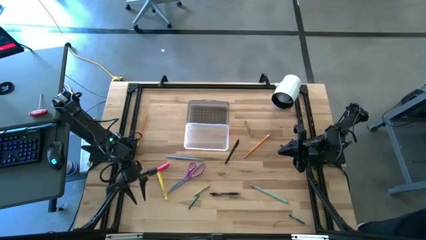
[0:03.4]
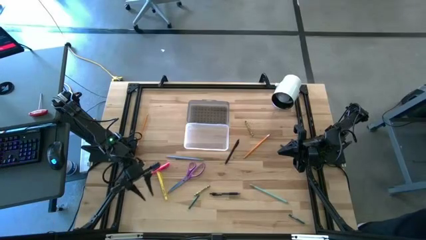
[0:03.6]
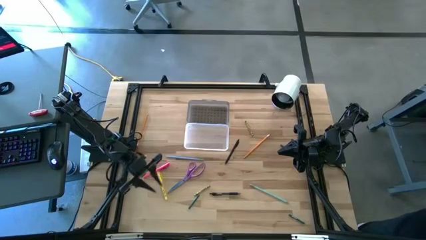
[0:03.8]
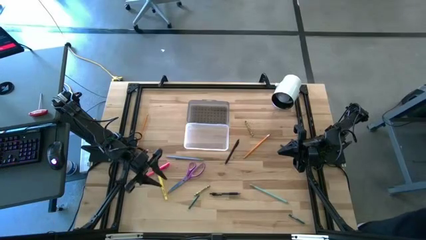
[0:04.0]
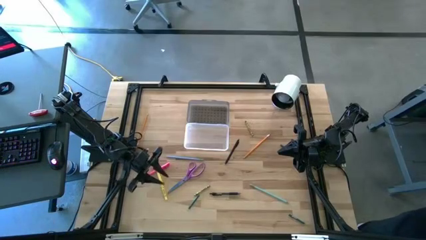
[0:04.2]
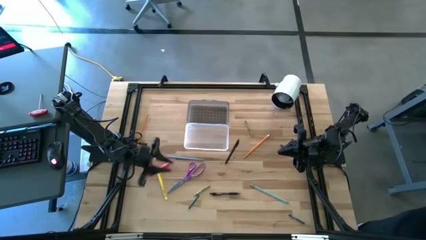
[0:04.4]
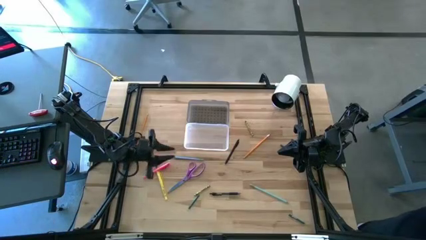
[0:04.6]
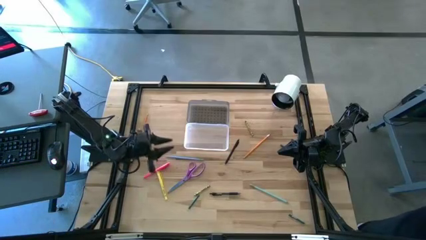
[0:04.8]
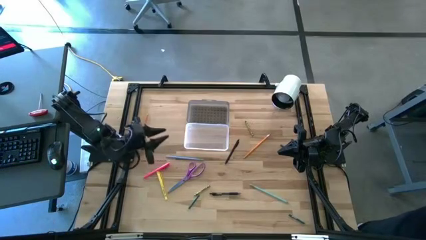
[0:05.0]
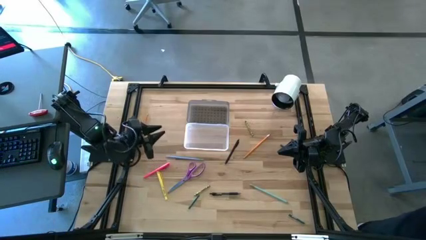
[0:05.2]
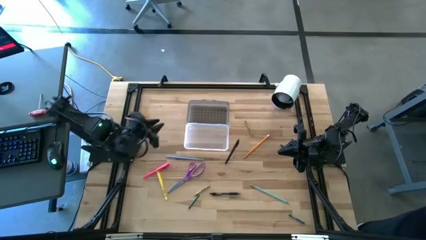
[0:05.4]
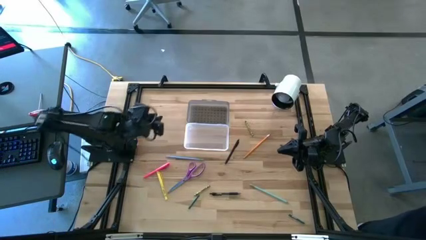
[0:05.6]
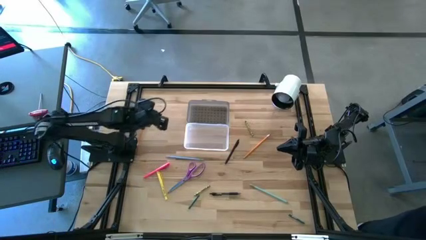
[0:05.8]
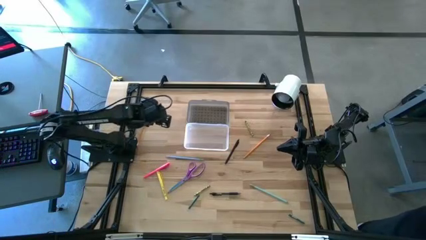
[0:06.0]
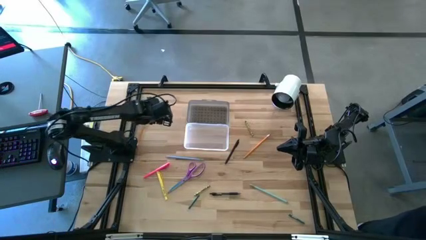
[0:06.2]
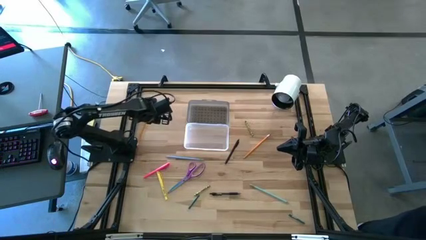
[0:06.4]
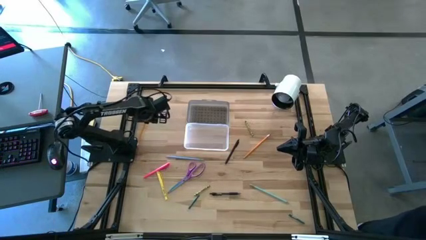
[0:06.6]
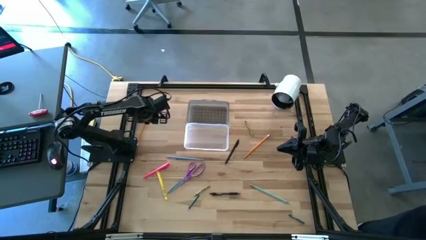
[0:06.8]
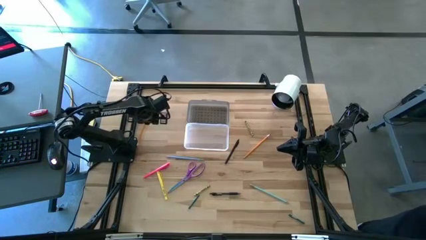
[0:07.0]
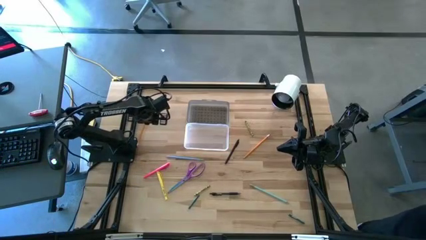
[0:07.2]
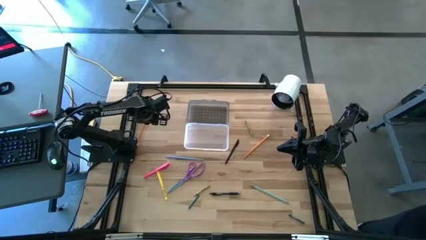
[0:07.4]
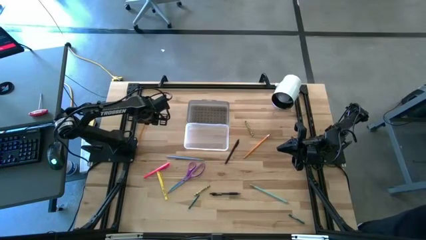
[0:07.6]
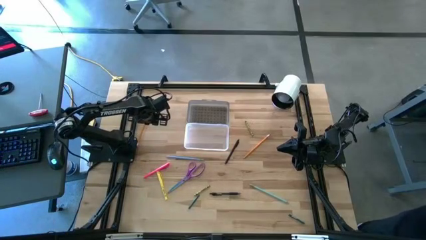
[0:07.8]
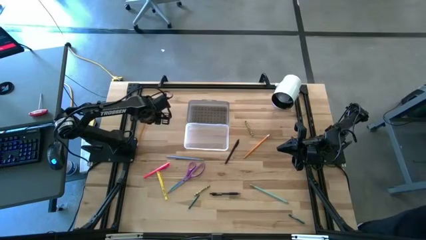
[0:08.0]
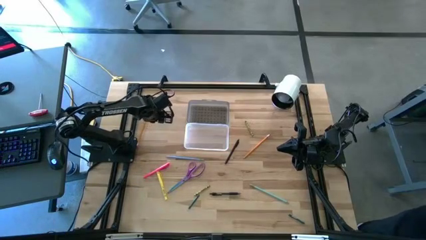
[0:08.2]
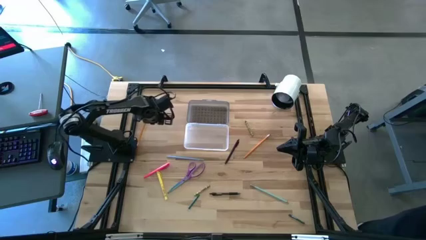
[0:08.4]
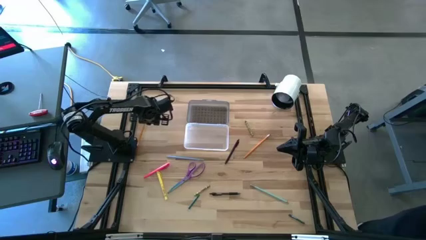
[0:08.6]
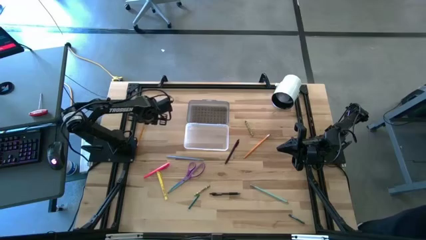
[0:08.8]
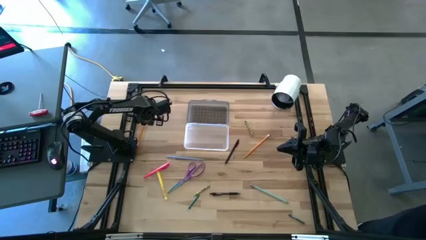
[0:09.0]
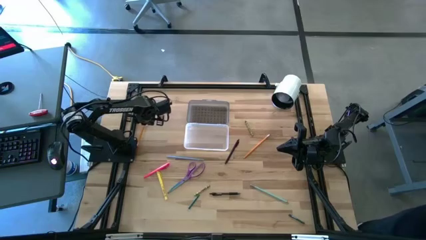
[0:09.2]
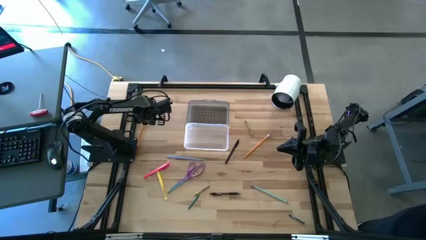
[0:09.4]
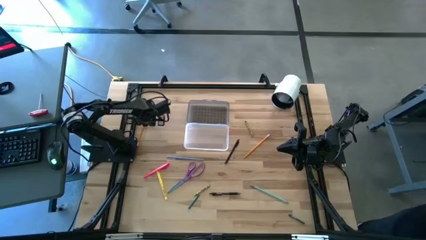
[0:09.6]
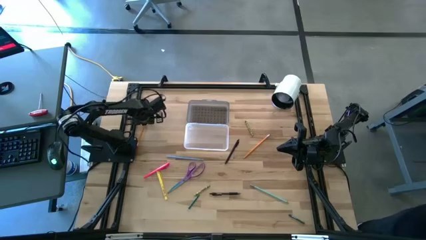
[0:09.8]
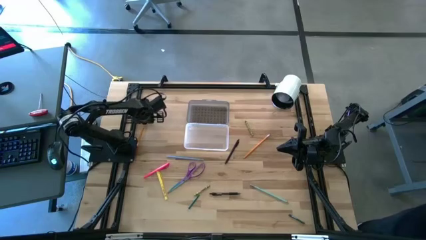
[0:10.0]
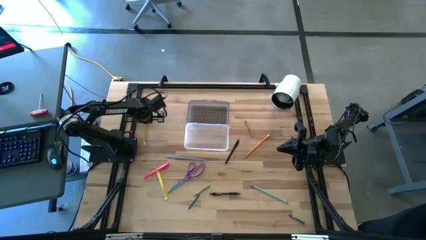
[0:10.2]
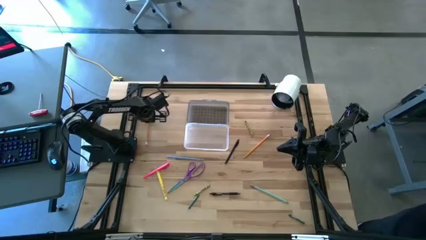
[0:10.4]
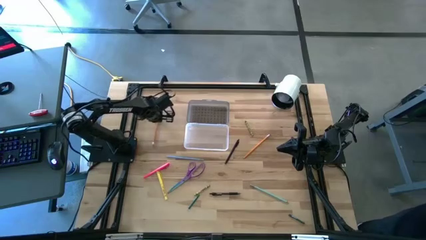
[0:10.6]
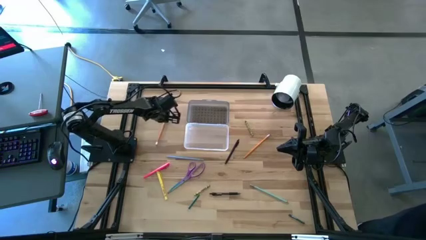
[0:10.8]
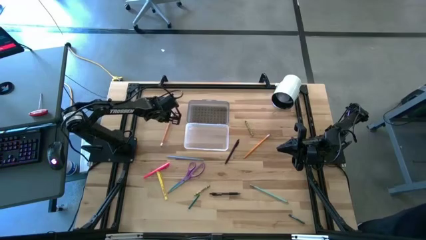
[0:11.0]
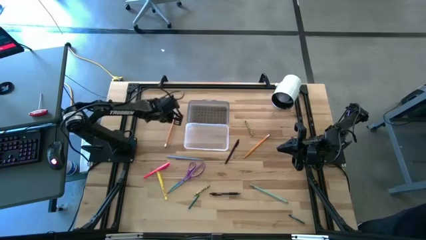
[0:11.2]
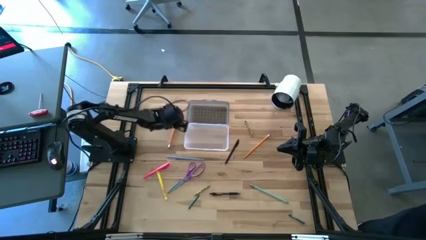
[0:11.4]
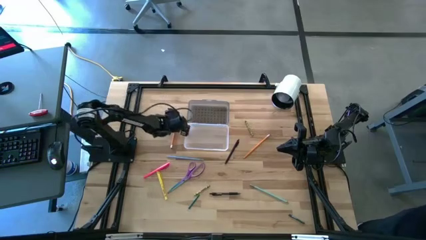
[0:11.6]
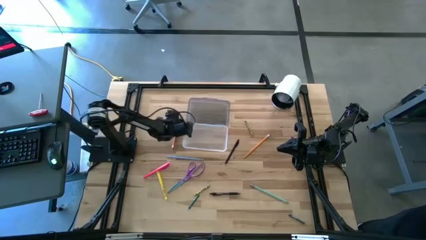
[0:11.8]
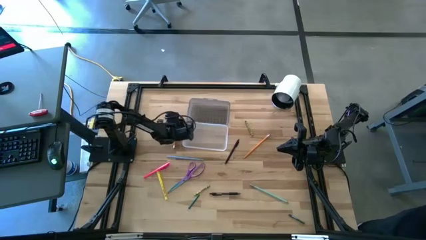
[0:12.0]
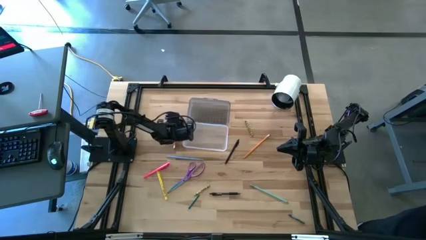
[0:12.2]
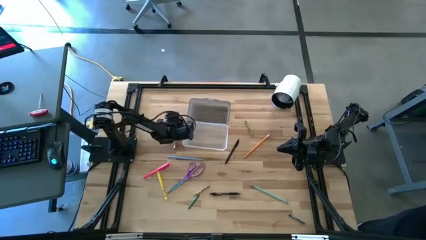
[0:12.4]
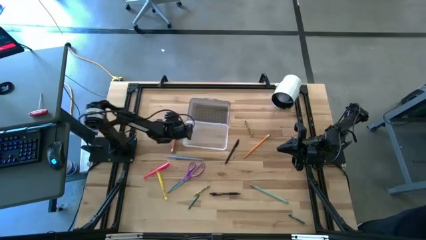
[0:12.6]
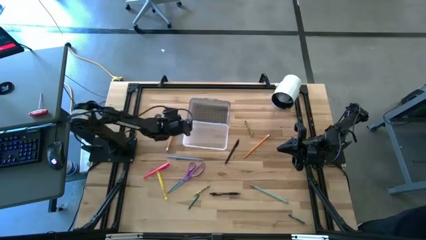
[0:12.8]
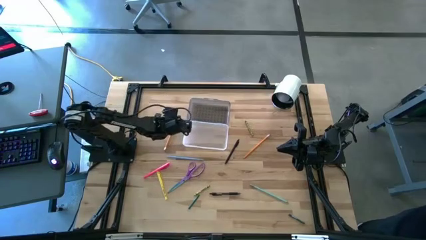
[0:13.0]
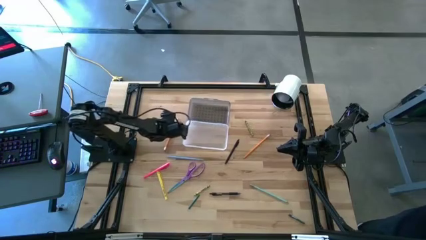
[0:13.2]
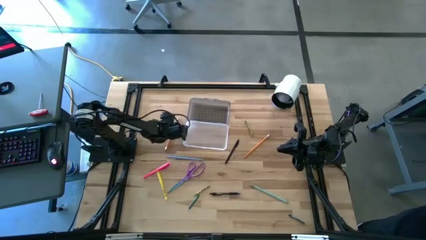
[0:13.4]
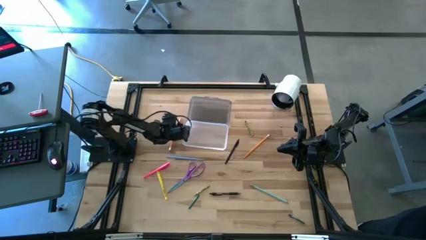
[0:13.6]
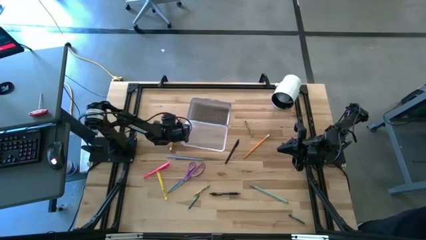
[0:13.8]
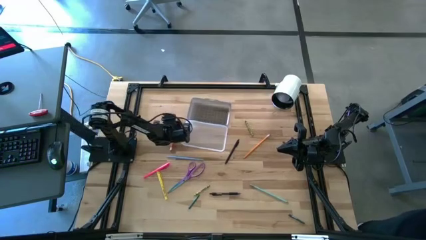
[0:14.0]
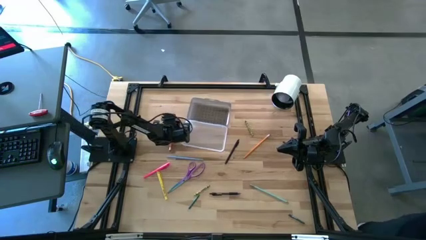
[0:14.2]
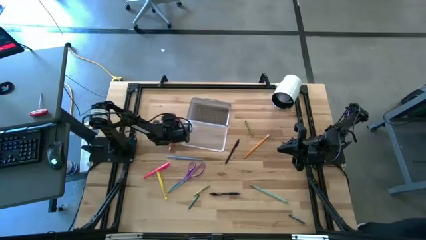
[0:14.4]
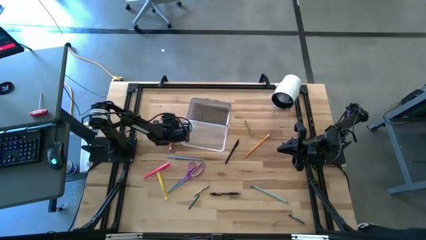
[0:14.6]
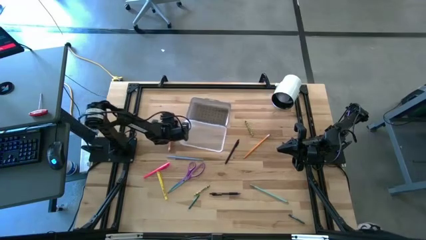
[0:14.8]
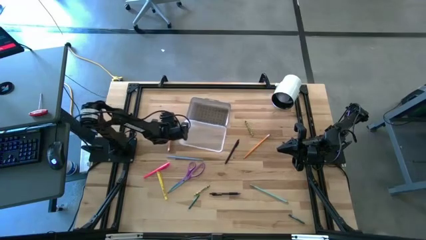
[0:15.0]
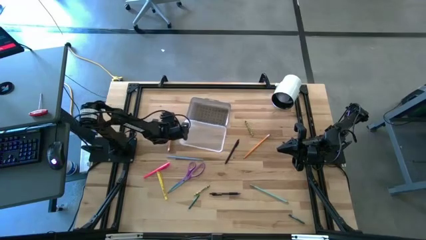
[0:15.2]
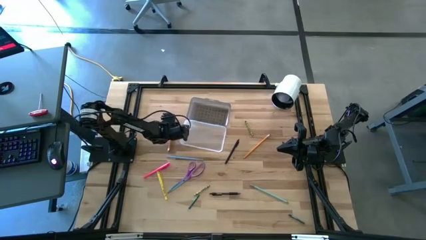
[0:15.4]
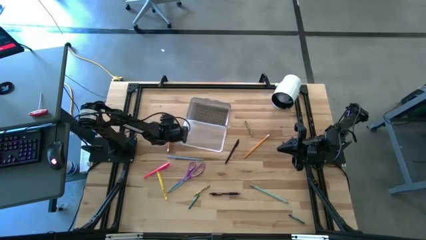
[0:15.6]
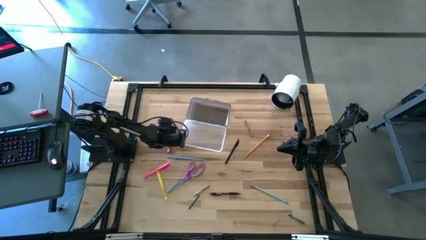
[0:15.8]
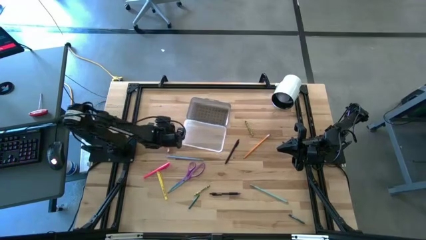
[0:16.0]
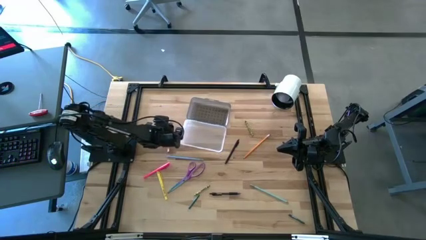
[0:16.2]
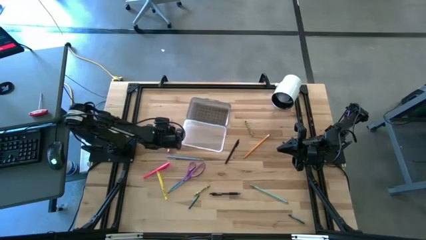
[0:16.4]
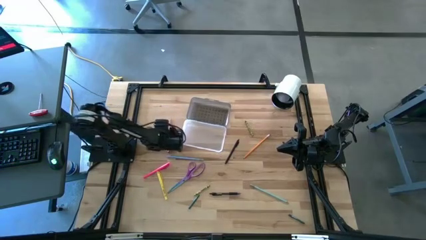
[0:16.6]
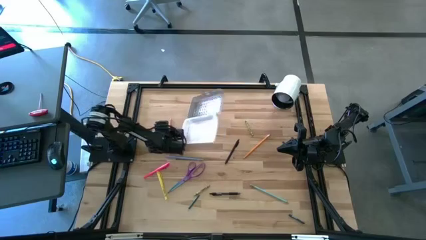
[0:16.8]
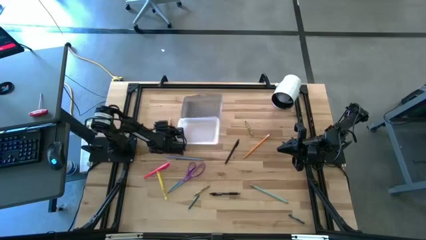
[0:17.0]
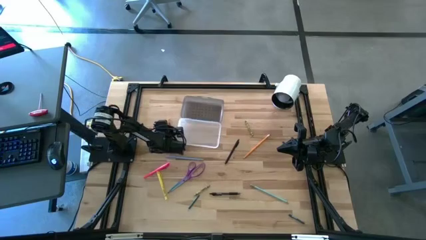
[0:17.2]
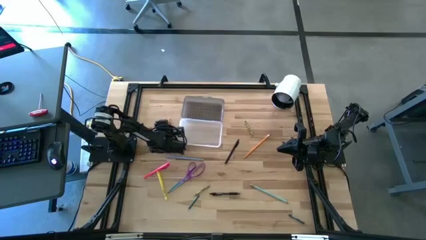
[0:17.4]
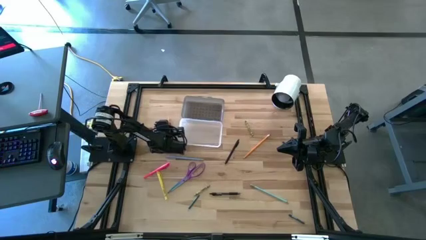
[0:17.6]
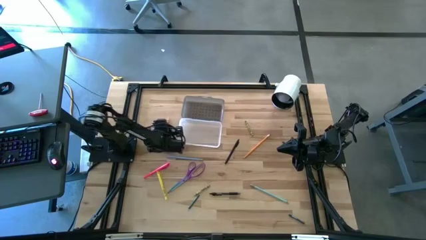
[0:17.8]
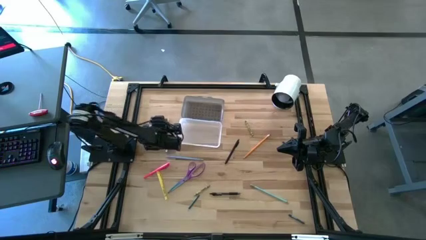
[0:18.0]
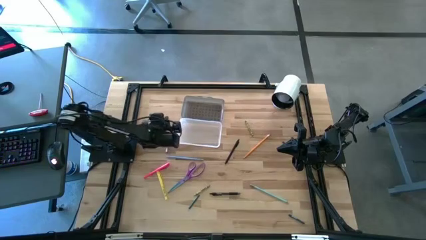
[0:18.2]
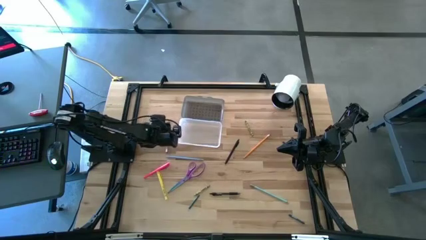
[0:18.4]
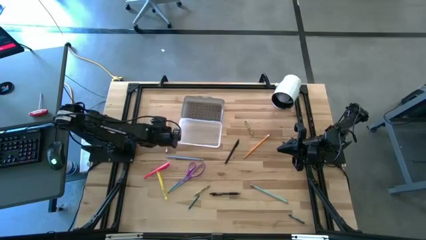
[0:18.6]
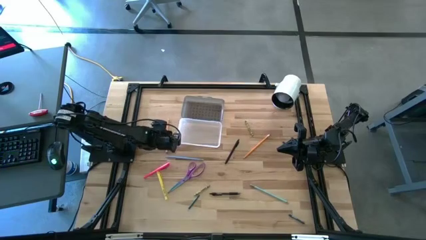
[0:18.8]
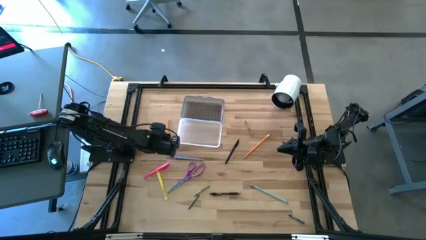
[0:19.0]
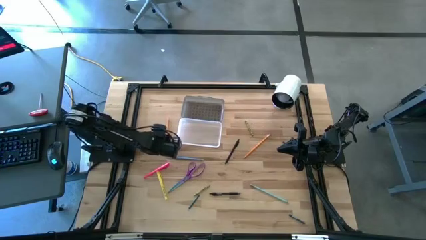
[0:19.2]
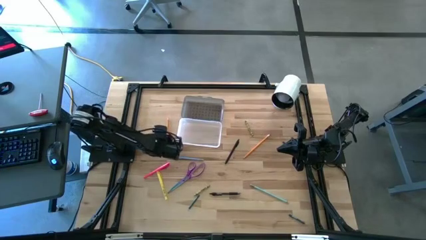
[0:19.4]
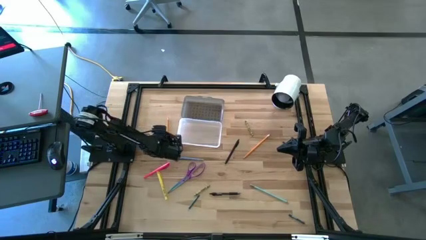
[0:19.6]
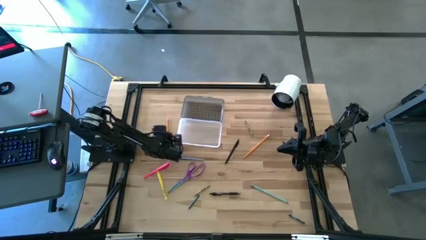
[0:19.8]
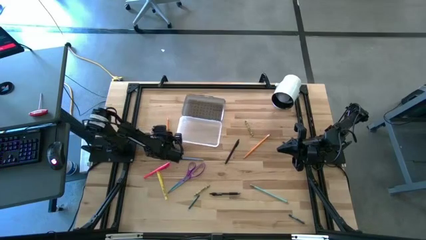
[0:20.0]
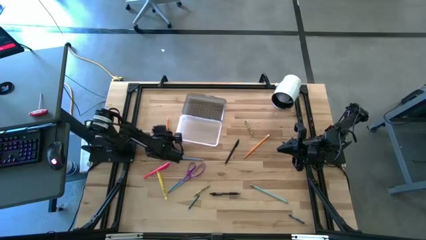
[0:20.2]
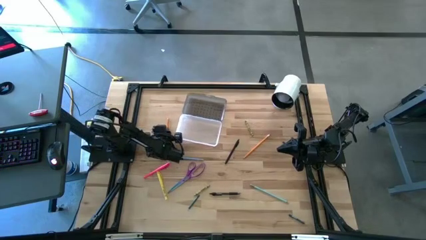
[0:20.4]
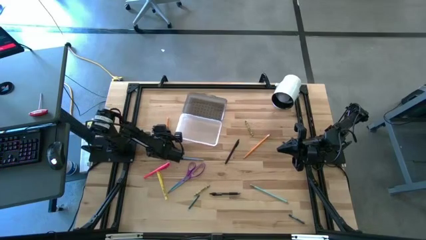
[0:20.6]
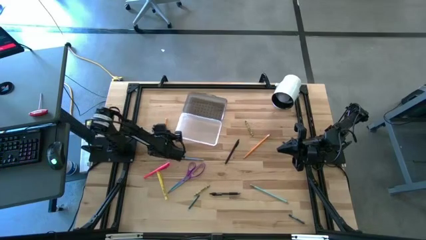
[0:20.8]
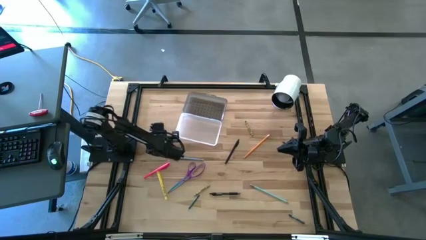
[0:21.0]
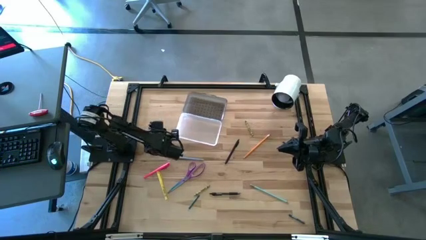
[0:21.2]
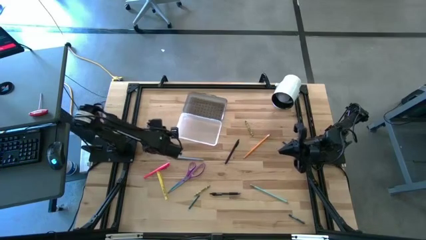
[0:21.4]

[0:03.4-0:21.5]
Task: Pick & place school supplies into a supply box
Put the orange pencil into the black supply box
